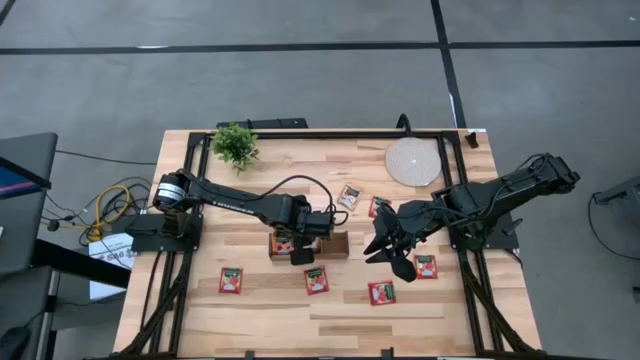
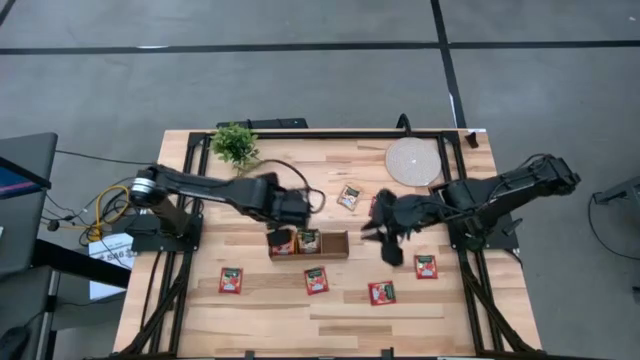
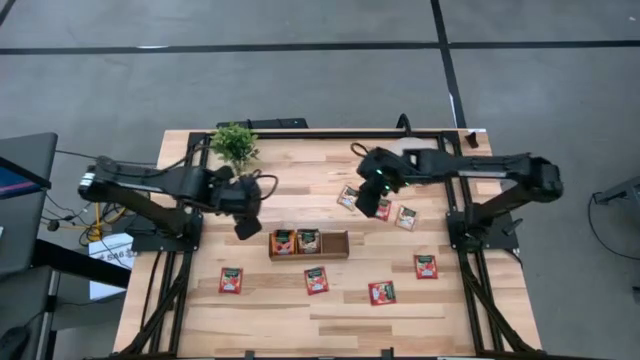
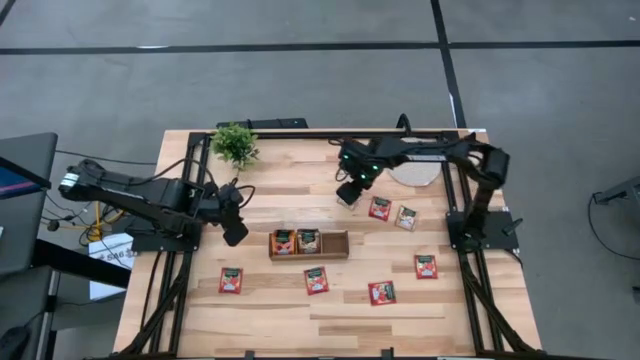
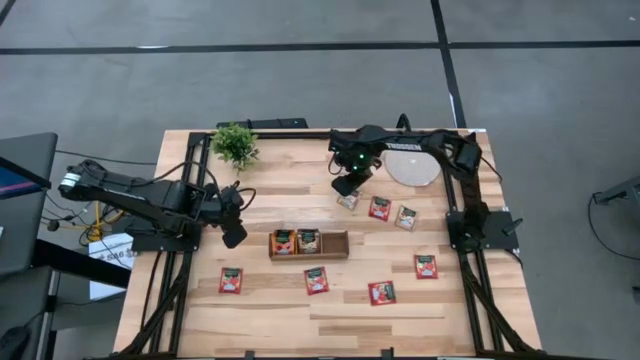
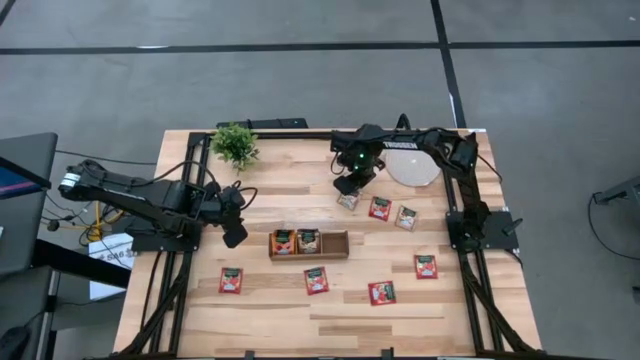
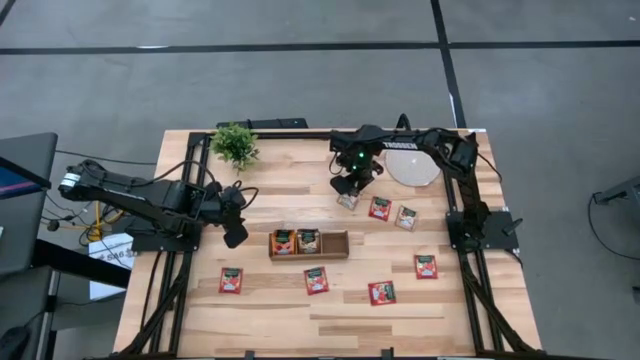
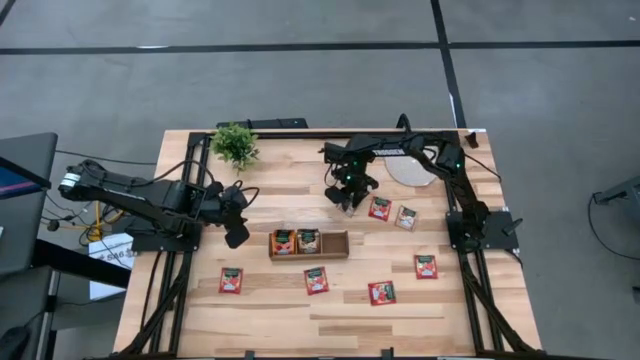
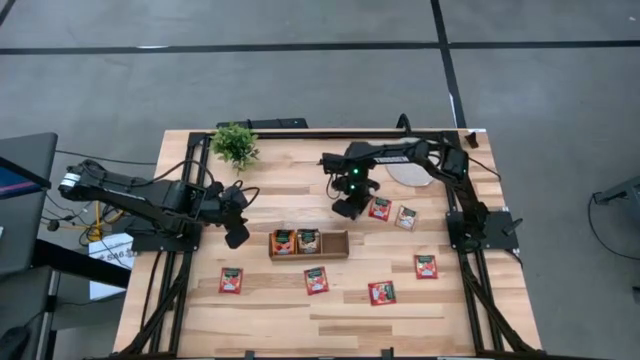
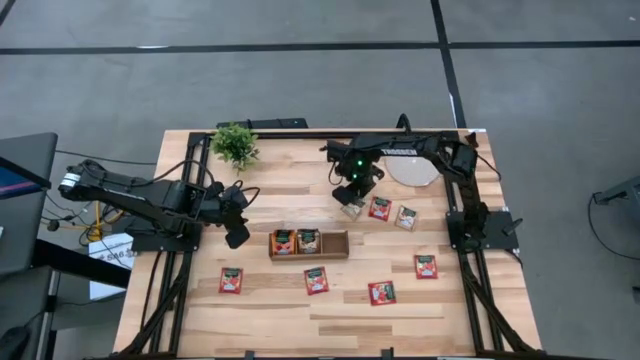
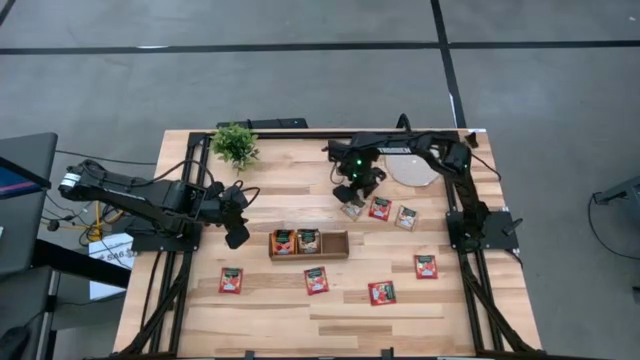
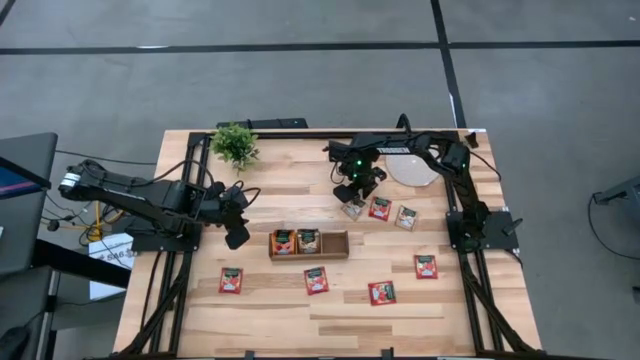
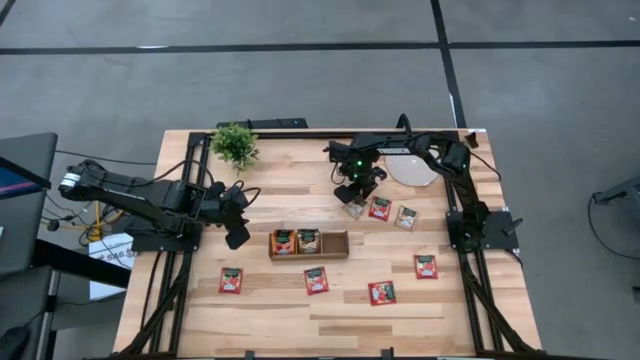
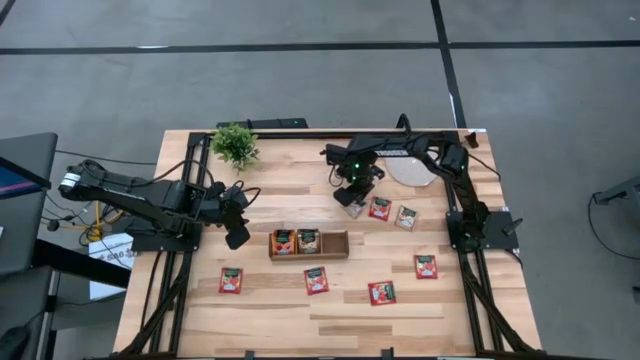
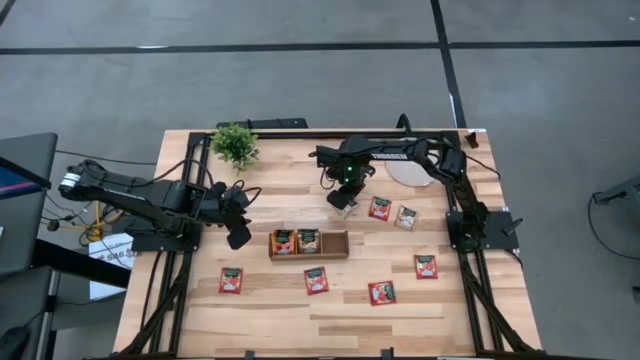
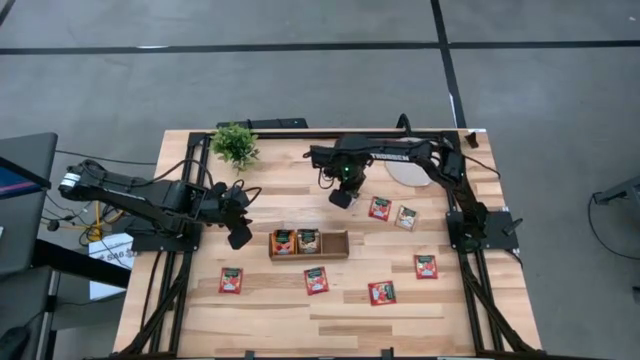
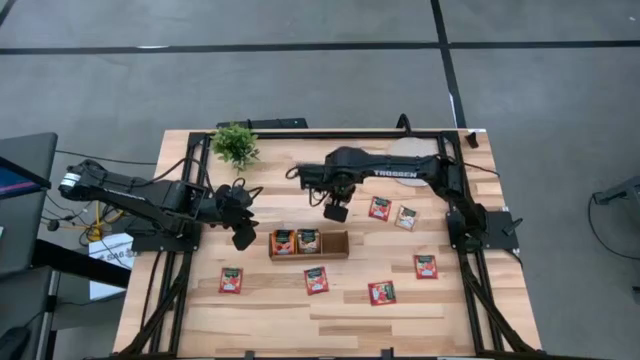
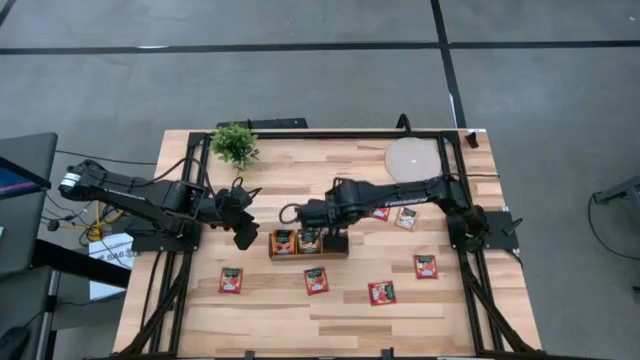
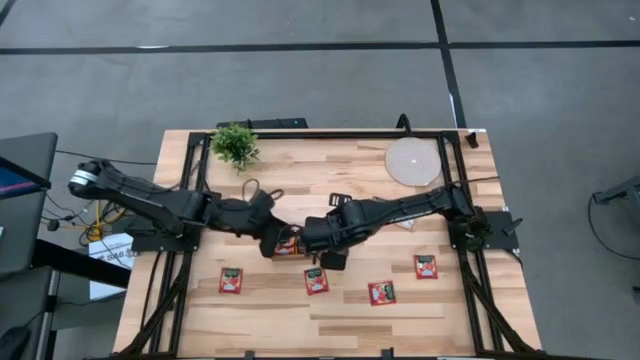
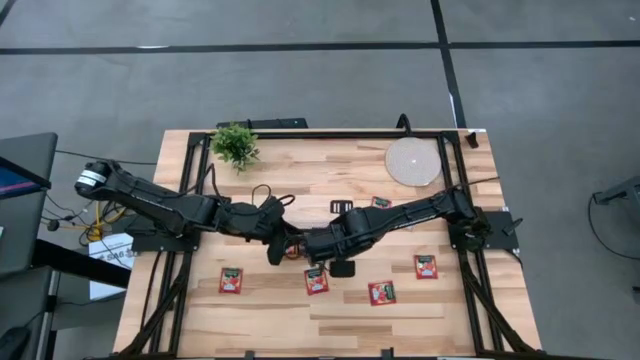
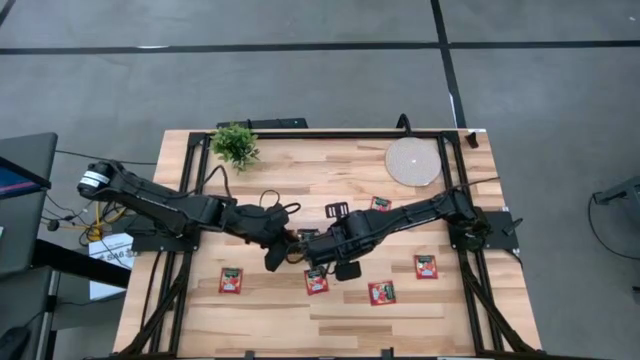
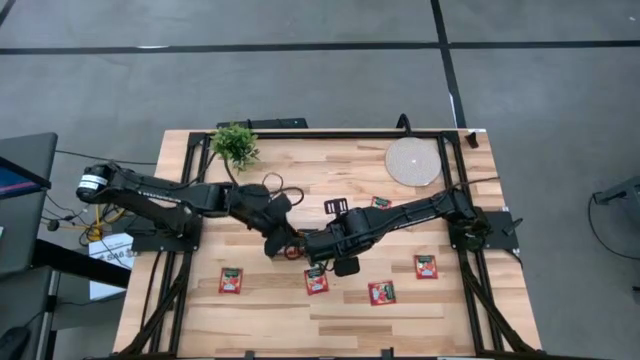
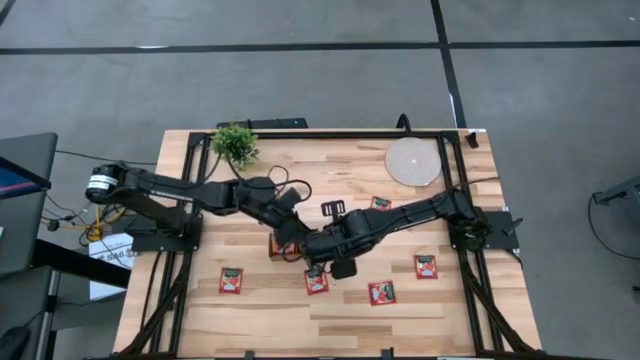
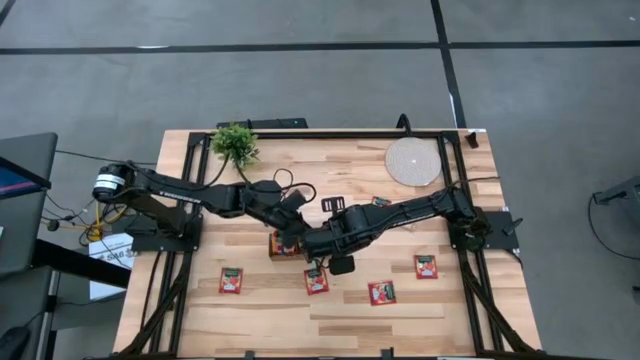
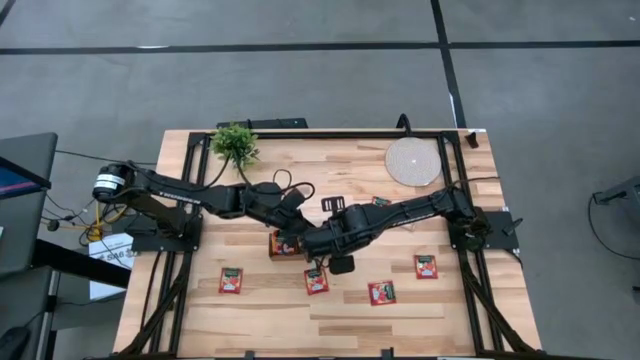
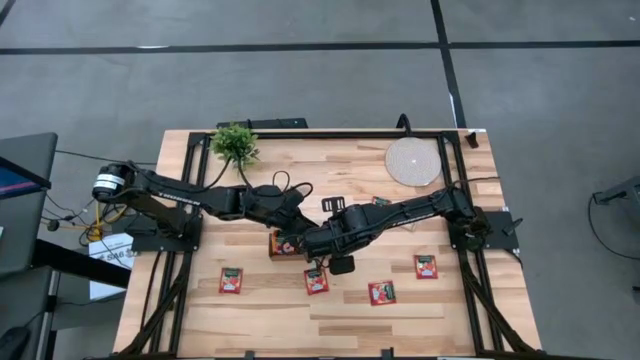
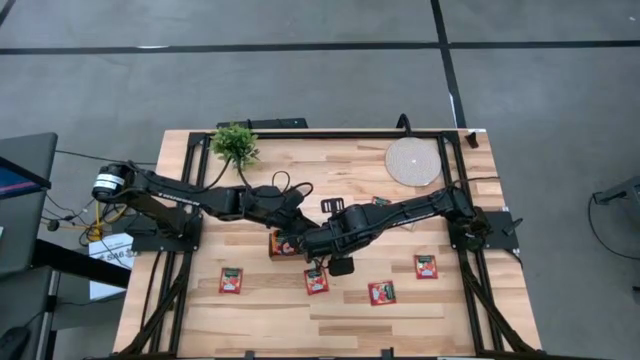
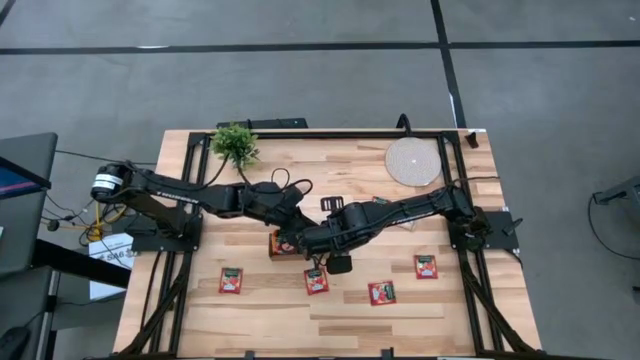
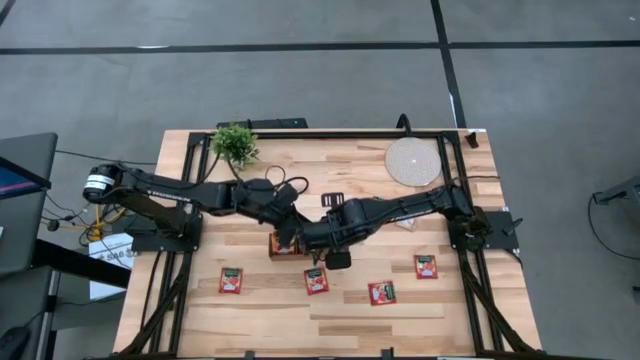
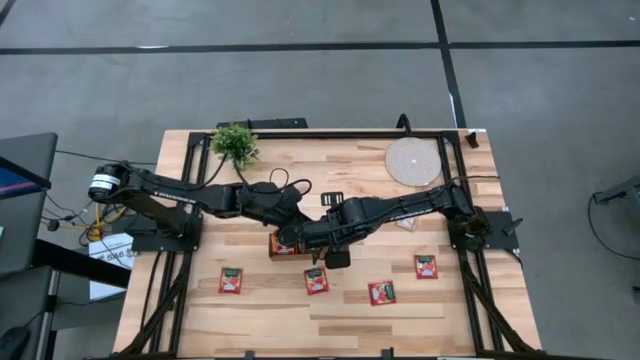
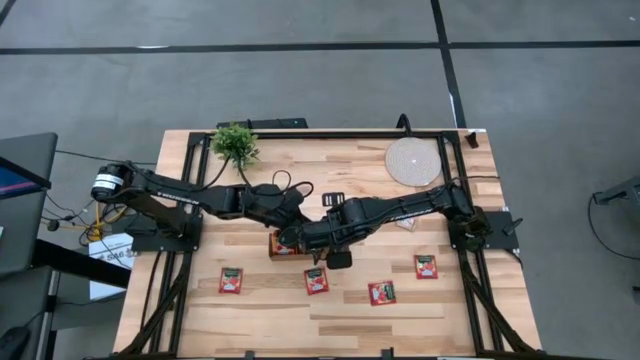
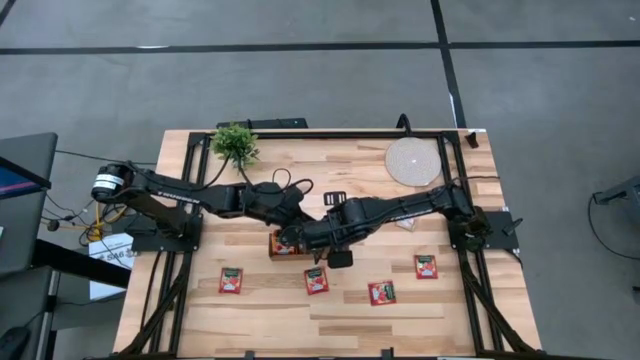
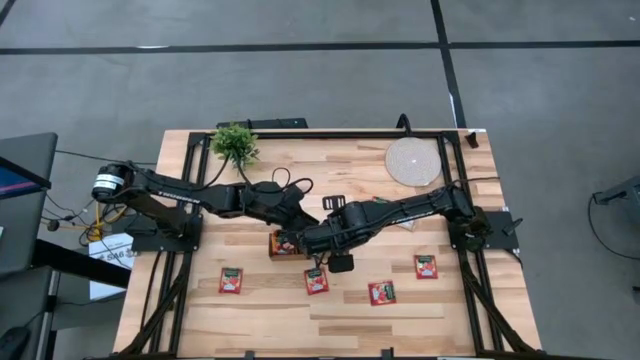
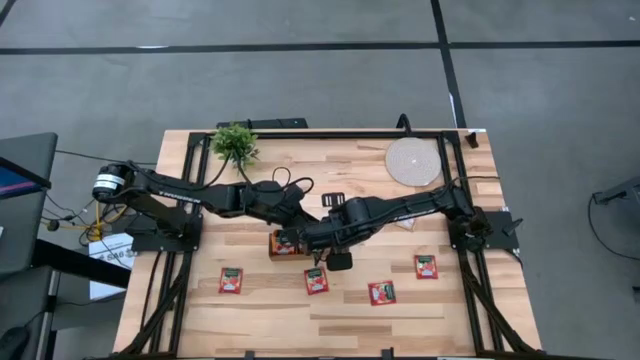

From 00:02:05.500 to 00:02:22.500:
Task: Pick & Place Tea
Put the brown tea bag into the middle section of the wooden organizer

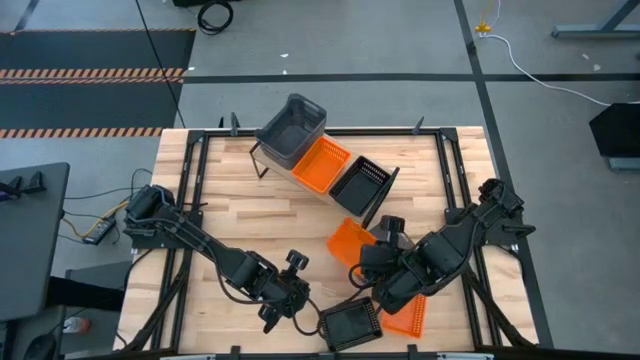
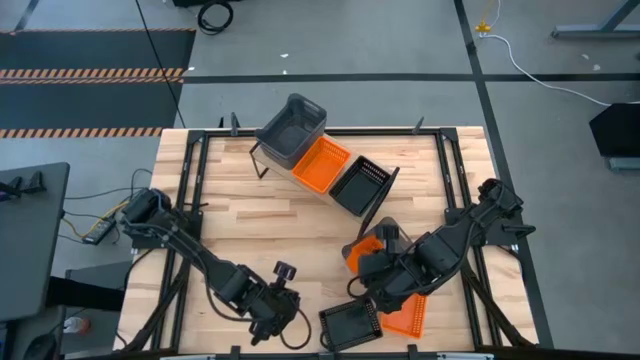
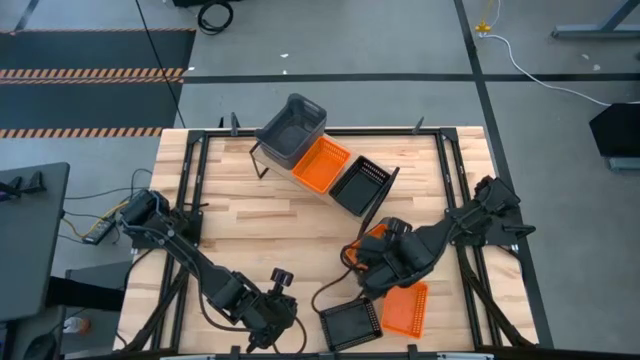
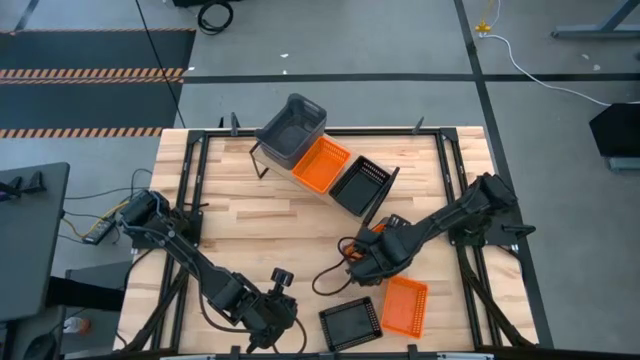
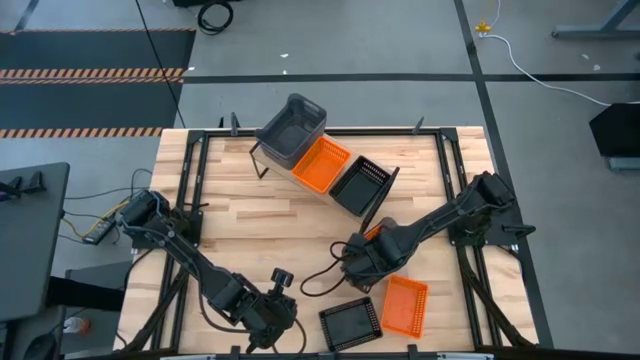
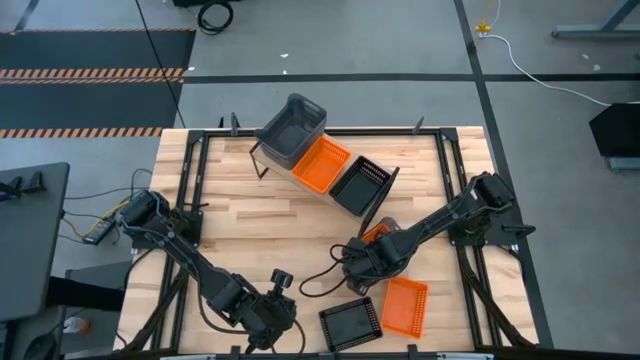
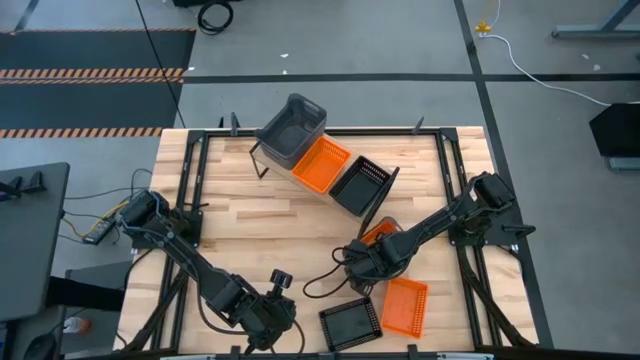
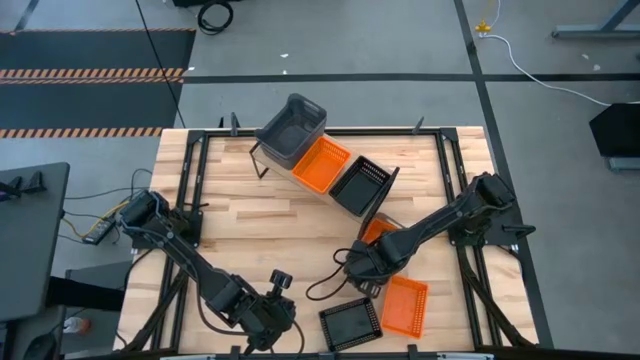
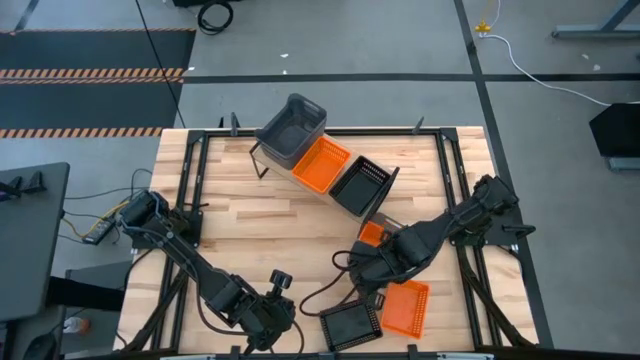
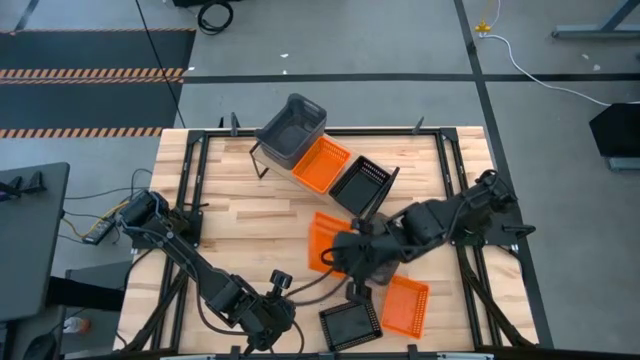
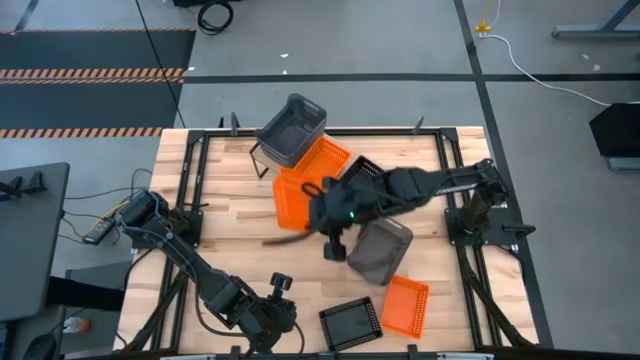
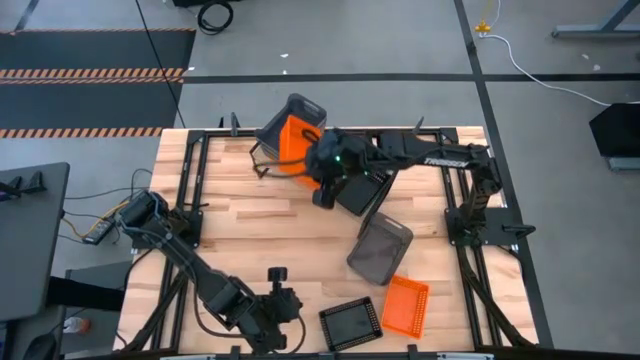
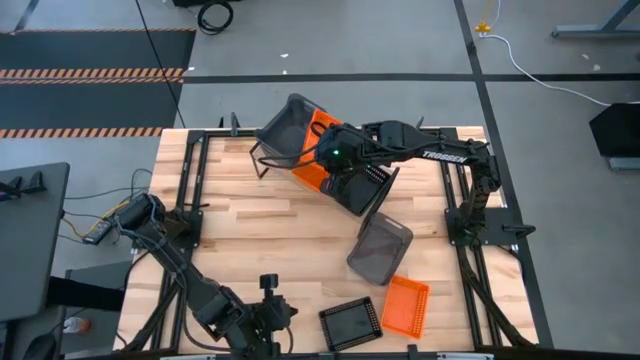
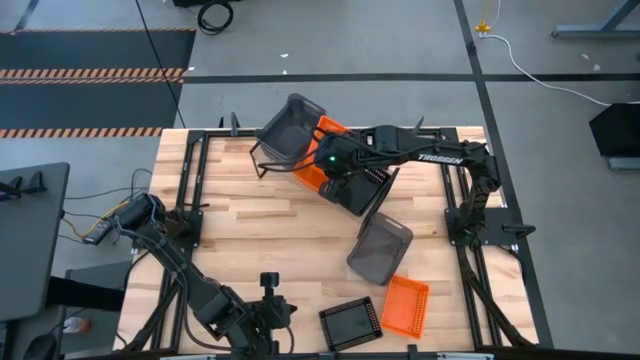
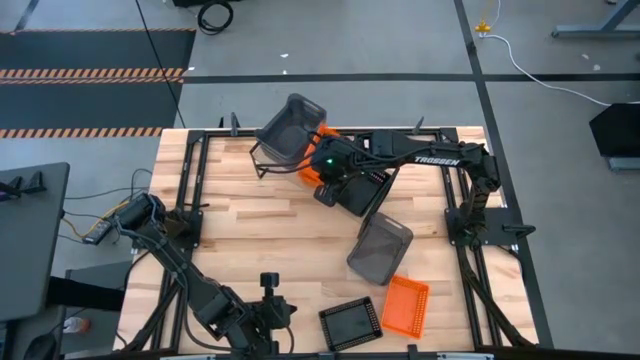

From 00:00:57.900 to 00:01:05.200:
Task: Stack baskets on shelf by color
Stack the top orange basket on top of the other orange basket on the shelf
